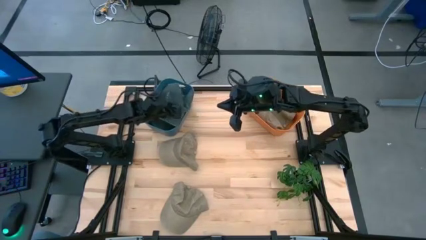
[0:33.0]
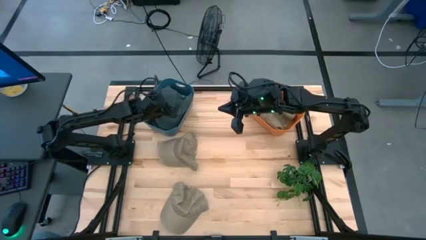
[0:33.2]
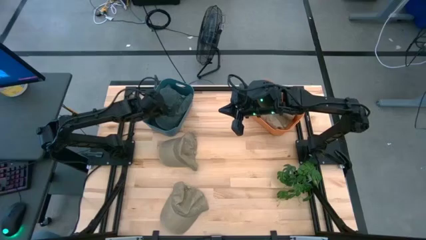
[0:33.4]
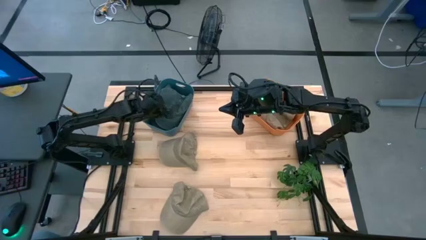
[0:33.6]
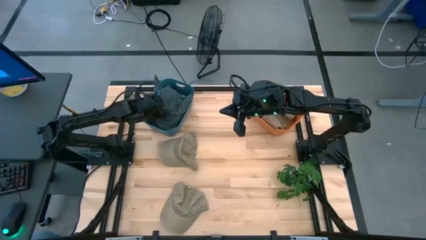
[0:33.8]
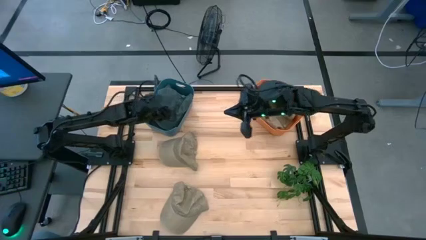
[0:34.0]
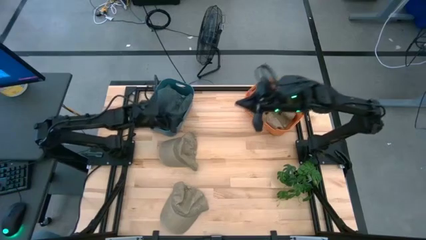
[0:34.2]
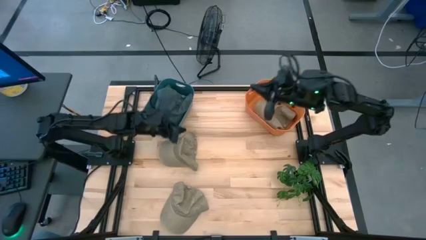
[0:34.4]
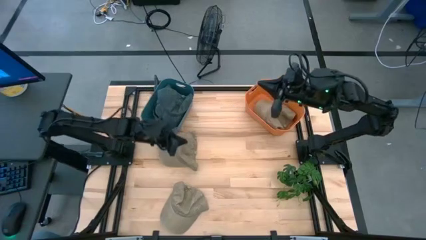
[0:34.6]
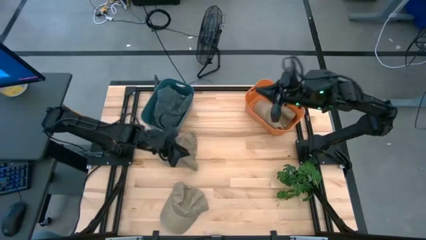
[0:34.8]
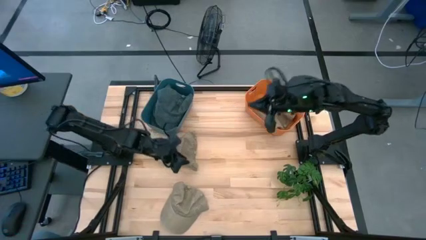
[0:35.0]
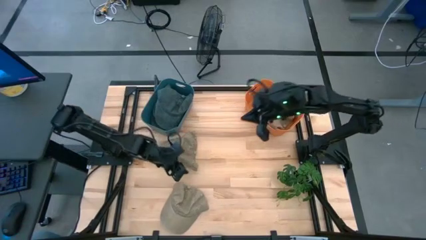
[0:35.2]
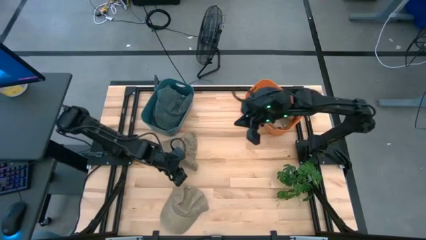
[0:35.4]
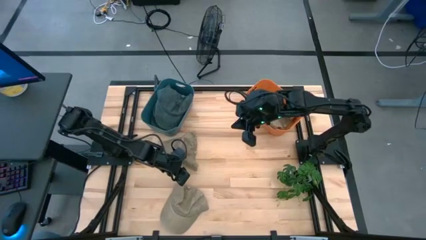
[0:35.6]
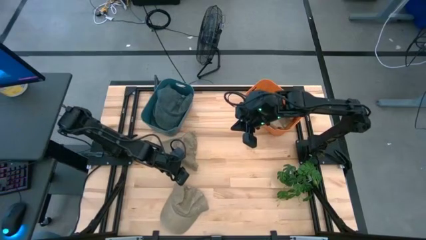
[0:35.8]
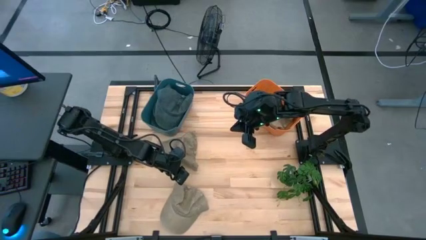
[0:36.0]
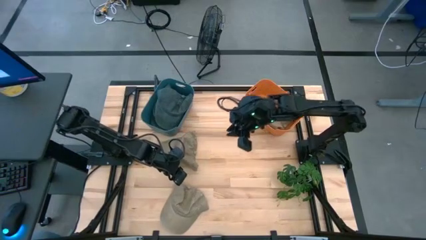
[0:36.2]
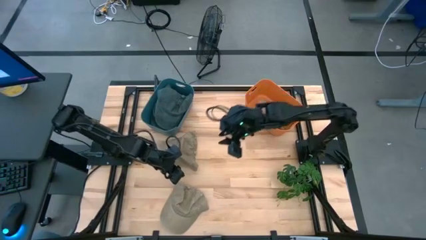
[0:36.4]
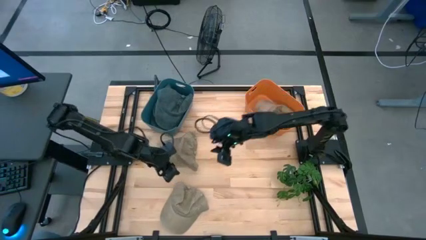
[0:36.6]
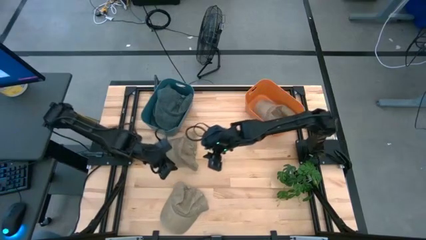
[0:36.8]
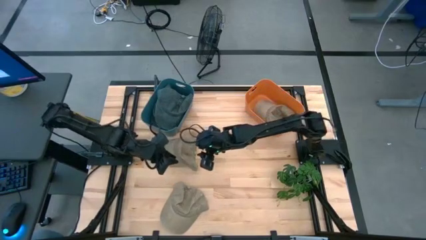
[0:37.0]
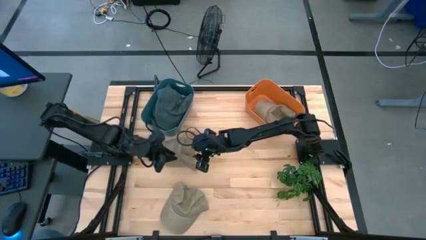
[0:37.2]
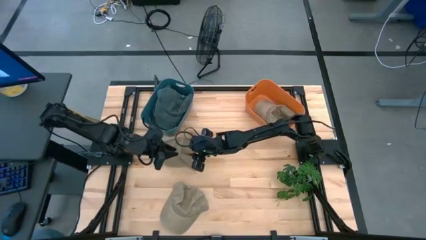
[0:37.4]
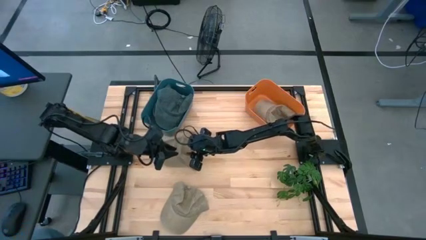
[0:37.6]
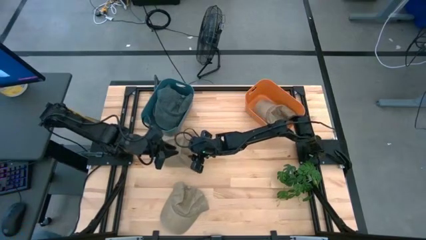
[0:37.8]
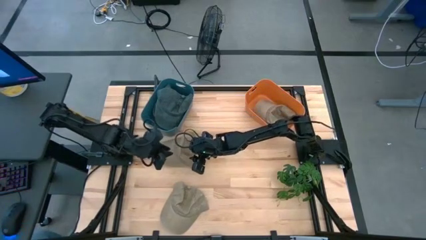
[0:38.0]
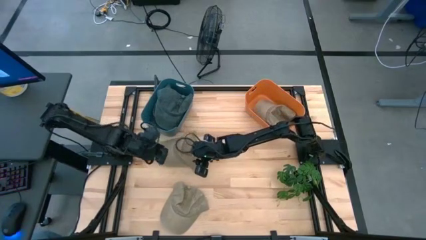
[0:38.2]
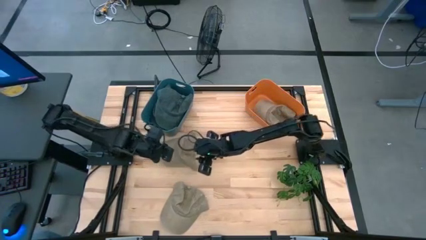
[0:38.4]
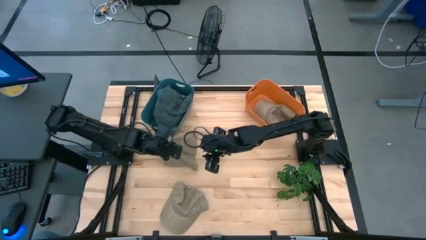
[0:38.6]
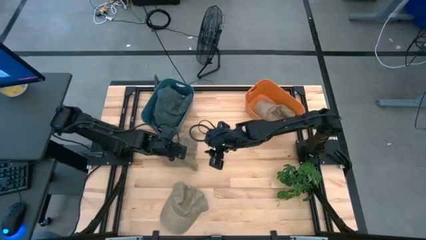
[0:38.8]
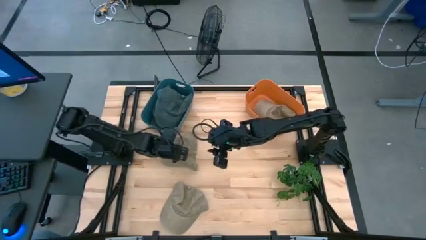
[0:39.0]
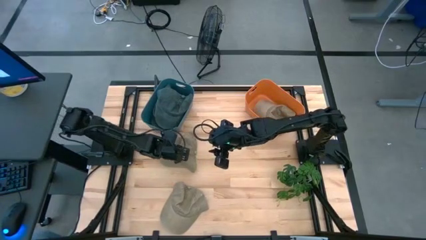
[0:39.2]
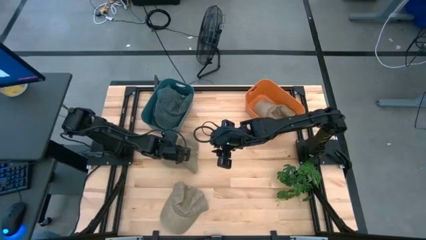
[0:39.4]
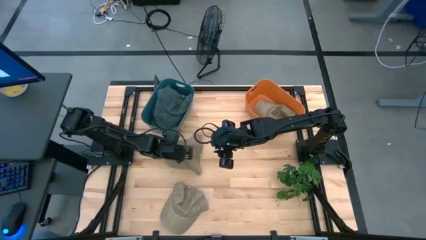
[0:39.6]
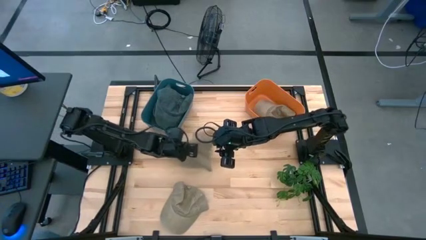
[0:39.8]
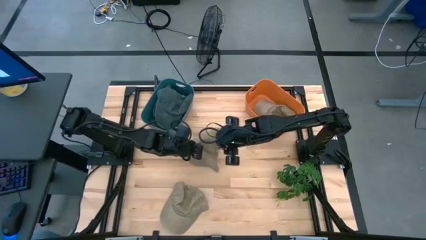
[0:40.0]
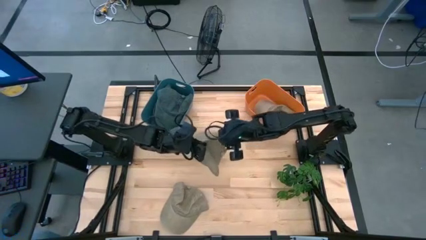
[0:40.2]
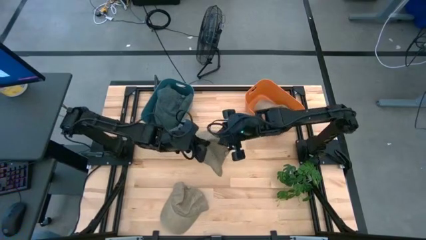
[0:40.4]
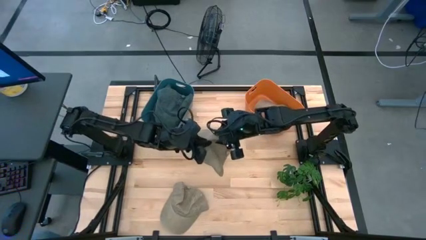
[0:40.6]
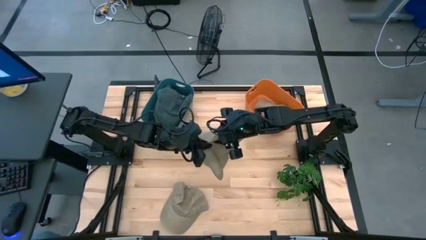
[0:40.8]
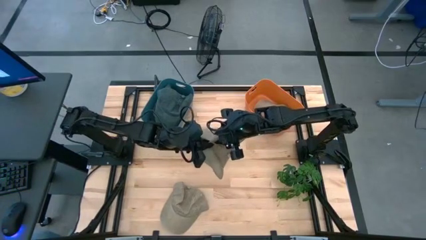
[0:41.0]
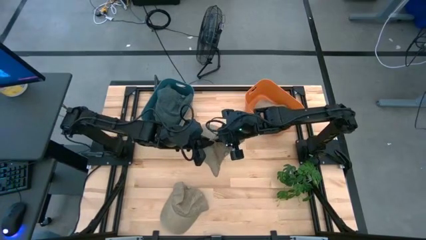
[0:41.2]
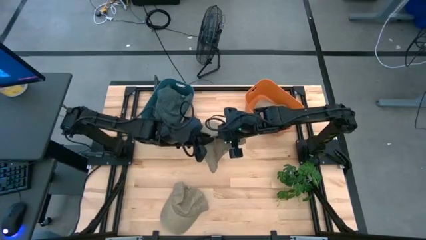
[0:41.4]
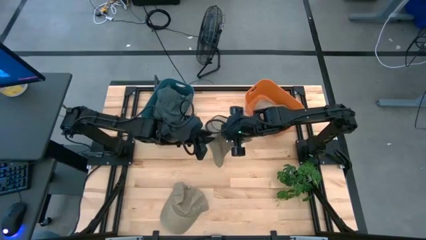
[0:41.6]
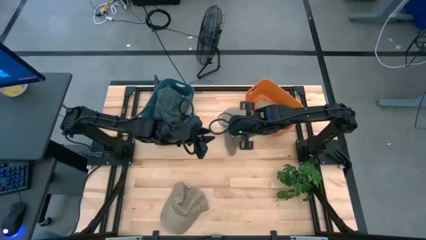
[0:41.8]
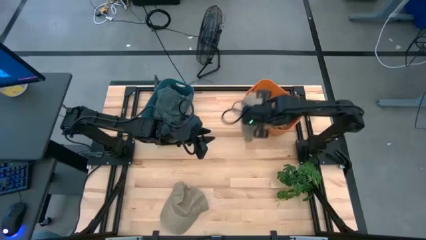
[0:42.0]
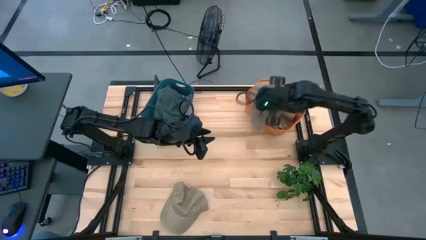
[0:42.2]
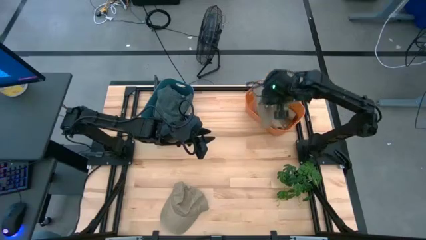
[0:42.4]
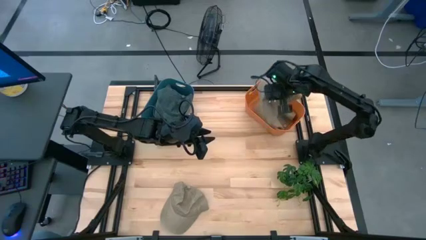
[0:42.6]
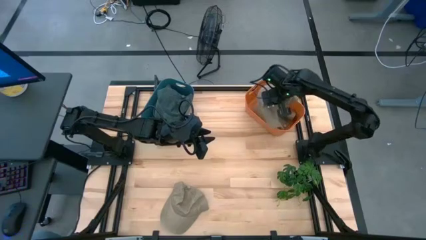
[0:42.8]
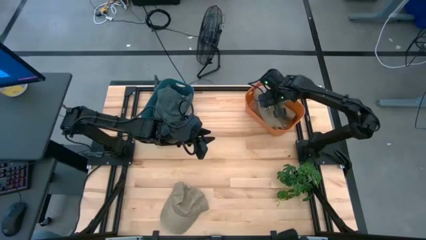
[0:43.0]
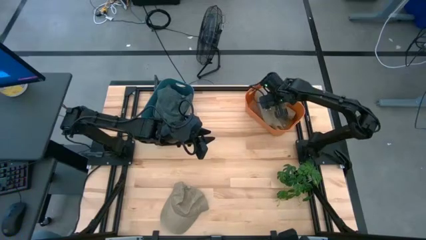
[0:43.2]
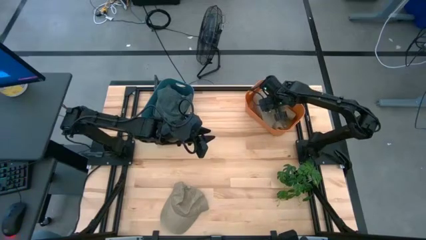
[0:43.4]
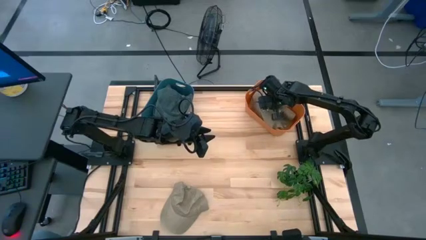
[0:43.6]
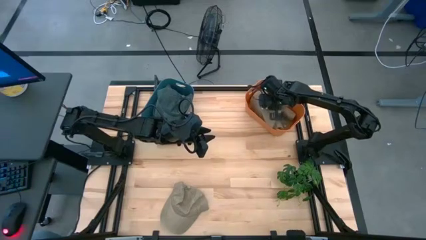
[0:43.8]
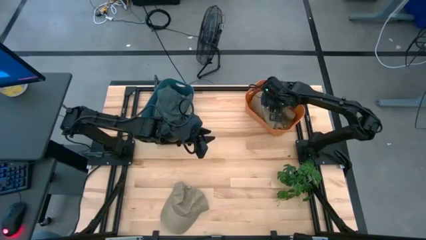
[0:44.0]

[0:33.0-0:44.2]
Task: Pick & Place hat
Put the top brown cap into the orange bin

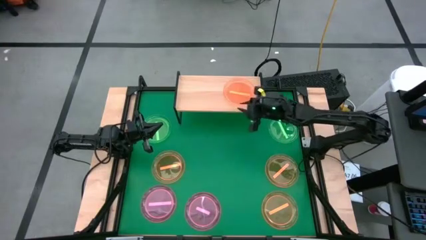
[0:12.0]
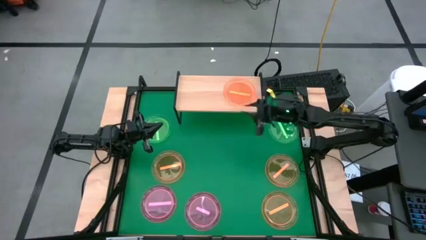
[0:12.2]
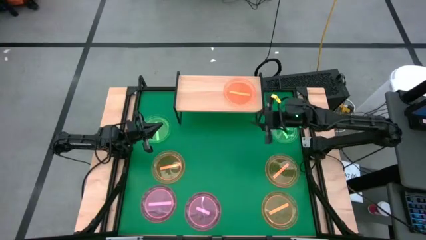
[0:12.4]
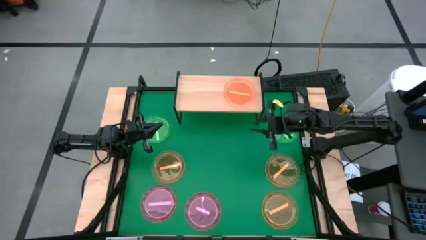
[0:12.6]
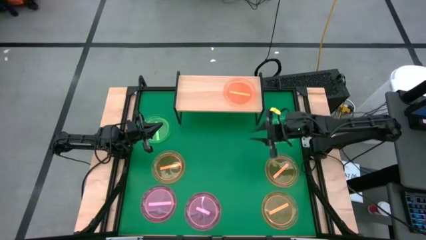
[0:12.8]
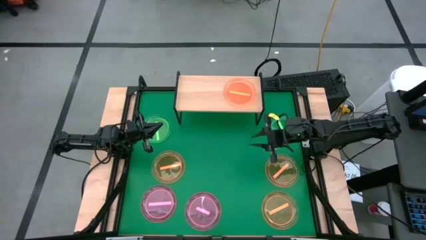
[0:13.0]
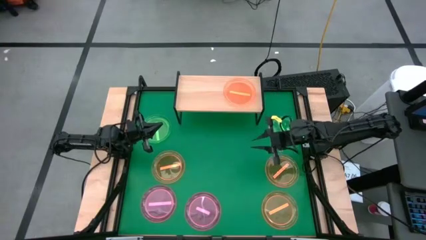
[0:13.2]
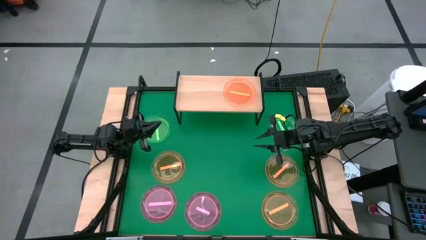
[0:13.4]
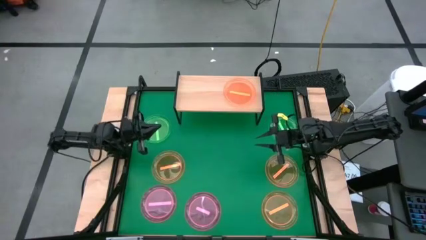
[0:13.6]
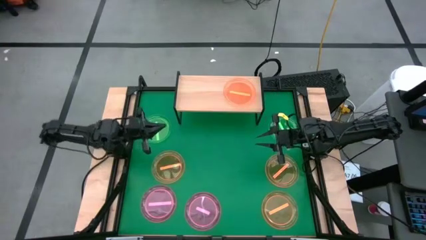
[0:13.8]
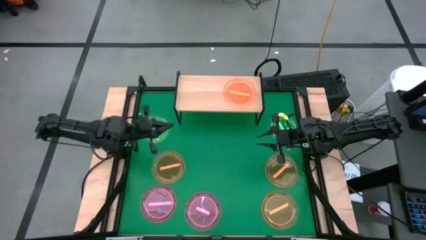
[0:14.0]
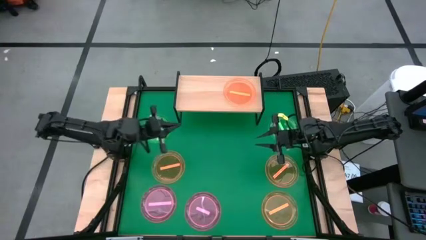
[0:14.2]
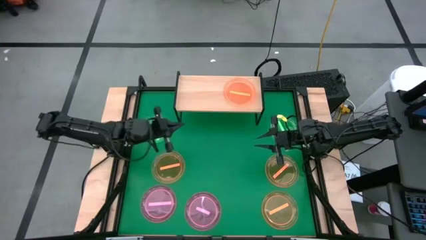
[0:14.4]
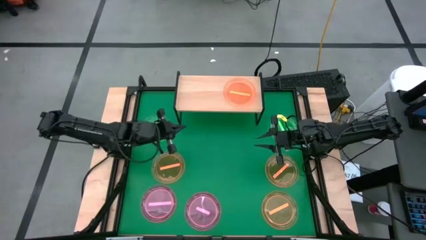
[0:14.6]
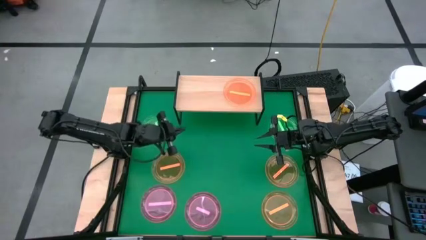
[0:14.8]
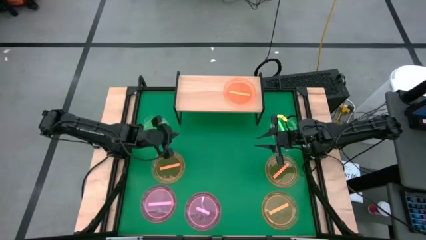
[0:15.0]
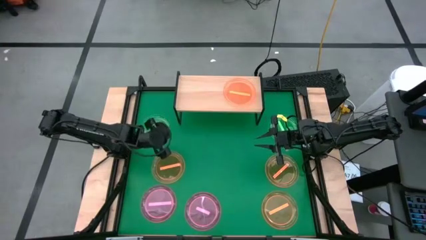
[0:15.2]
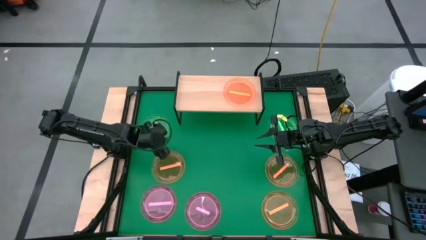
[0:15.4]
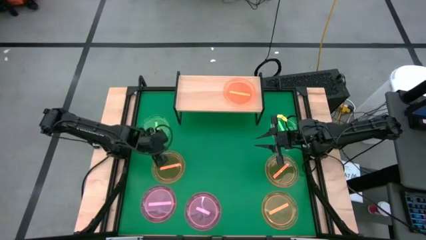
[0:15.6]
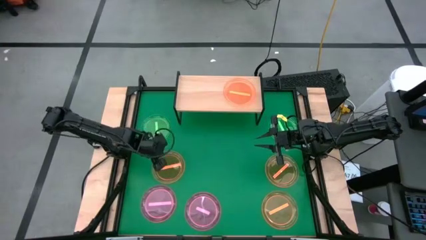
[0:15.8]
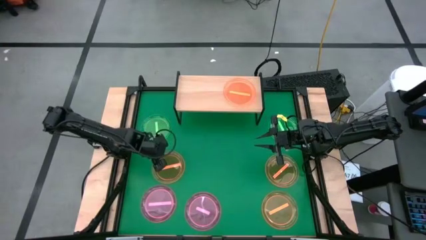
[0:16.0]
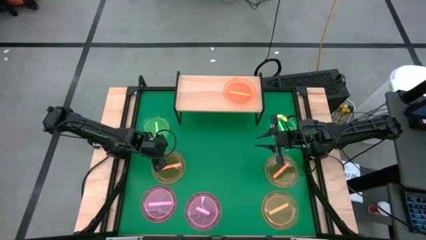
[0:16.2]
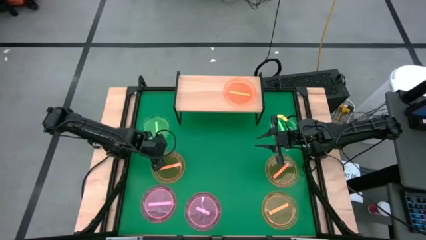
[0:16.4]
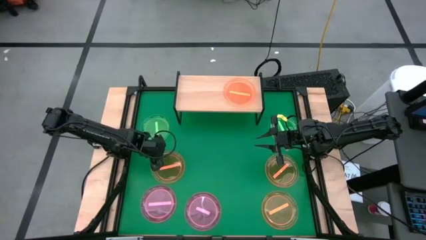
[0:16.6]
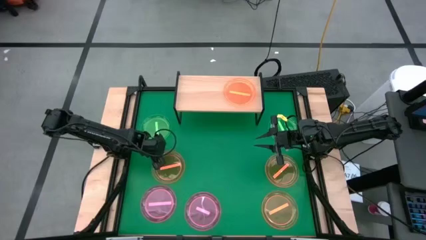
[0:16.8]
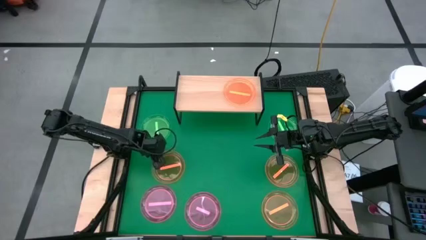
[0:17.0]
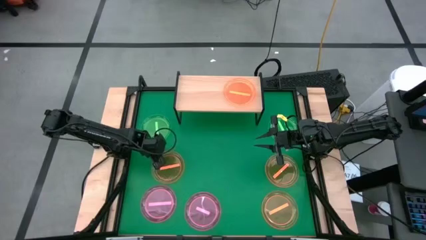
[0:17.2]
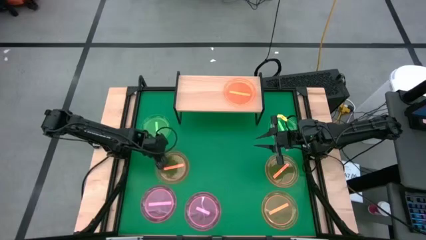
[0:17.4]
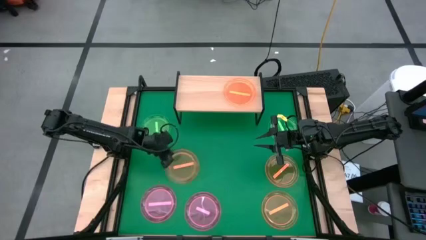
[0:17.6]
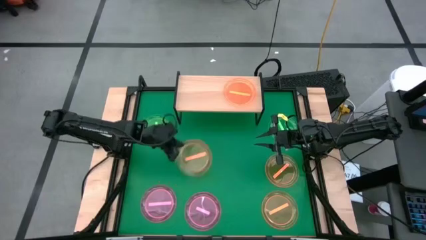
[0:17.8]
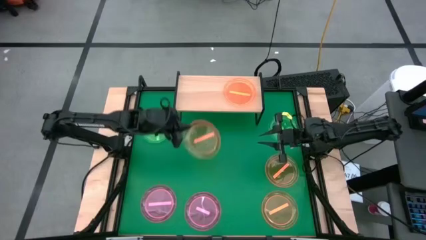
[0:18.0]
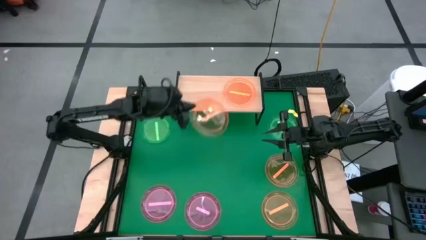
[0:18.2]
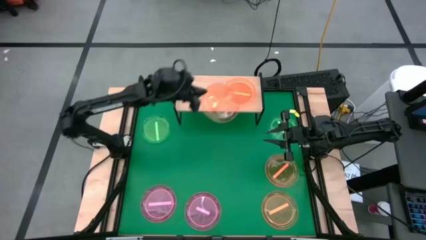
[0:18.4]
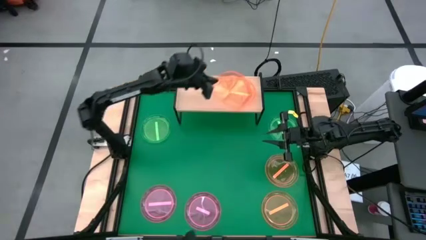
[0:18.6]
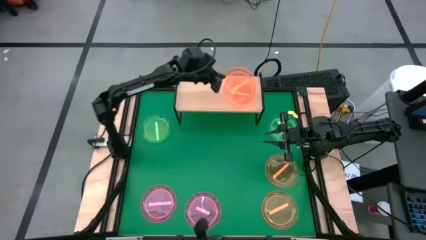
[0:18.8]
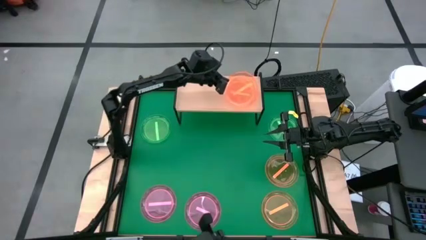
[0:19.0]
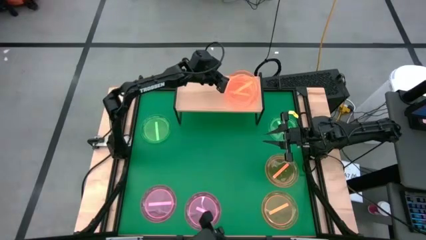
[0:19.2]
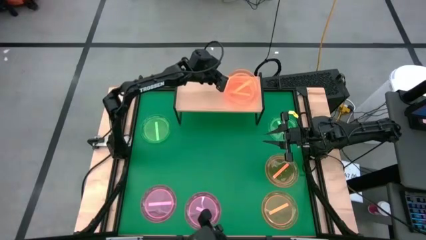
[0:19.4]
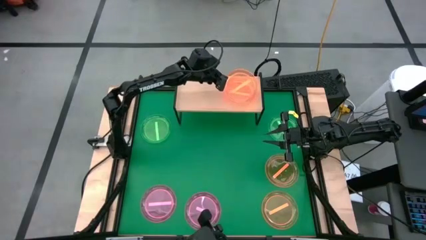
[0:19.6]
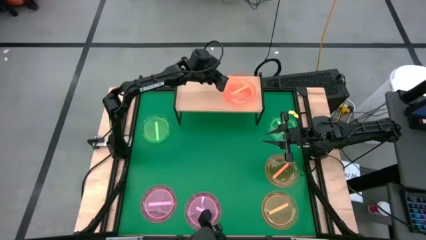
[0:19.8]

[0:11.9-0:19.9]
Task: Place and stack plates onto a shelf
Stack the orange plate on top of the other orange plate on the shelf
